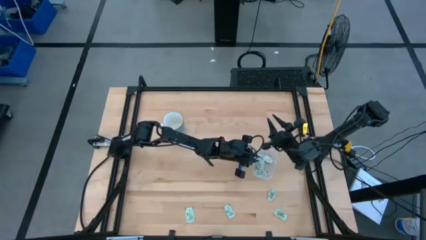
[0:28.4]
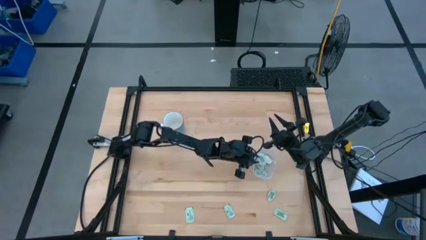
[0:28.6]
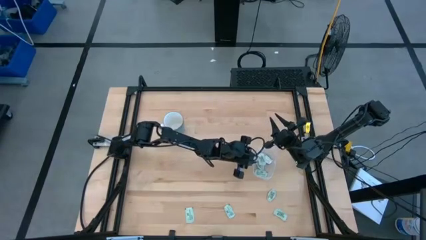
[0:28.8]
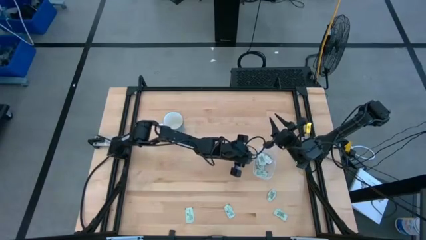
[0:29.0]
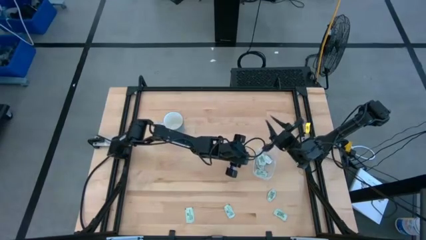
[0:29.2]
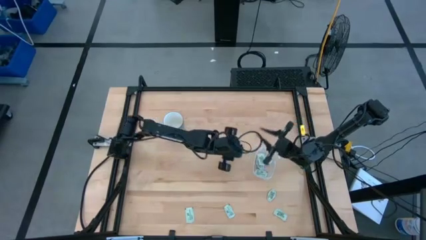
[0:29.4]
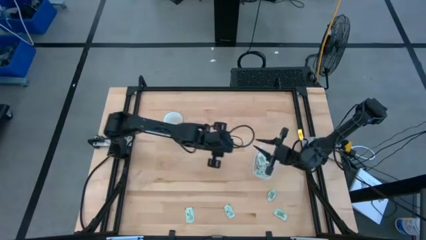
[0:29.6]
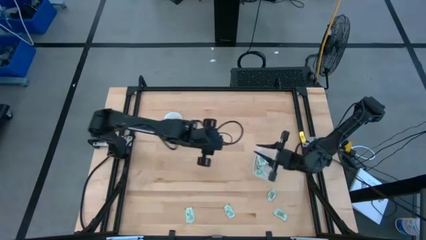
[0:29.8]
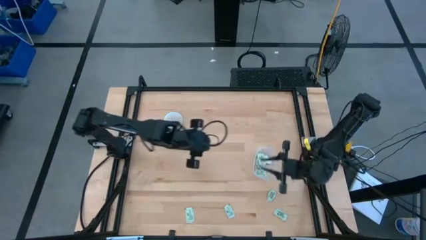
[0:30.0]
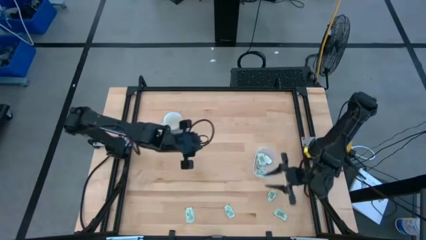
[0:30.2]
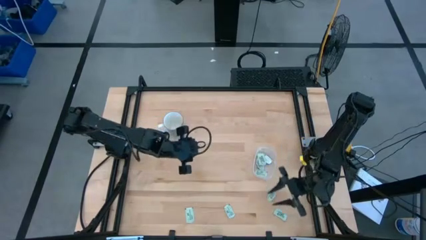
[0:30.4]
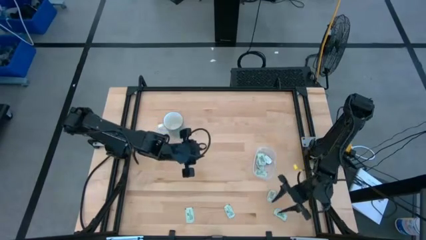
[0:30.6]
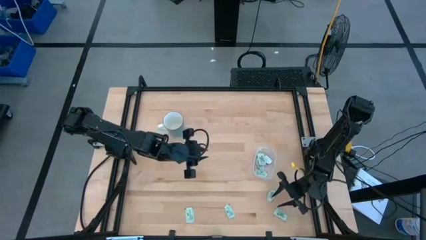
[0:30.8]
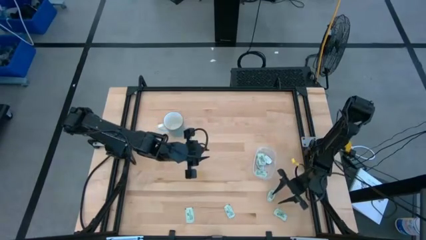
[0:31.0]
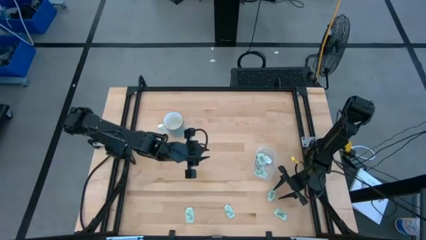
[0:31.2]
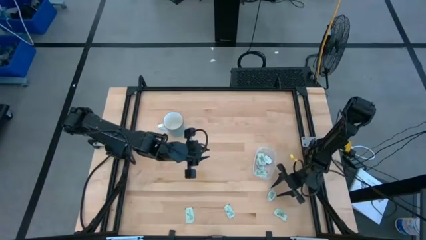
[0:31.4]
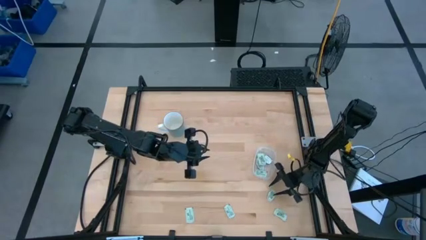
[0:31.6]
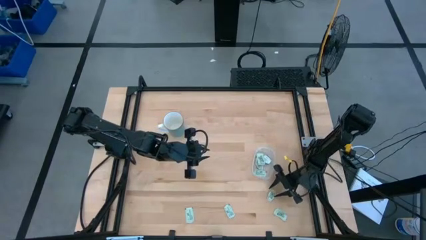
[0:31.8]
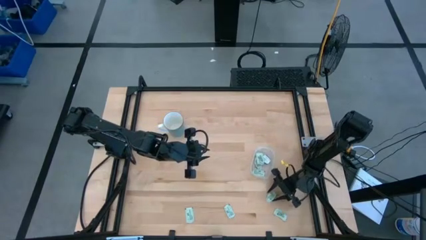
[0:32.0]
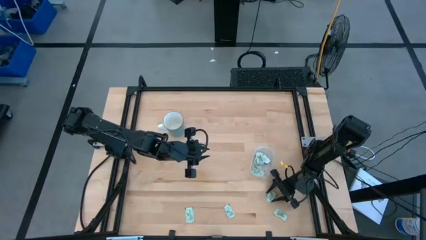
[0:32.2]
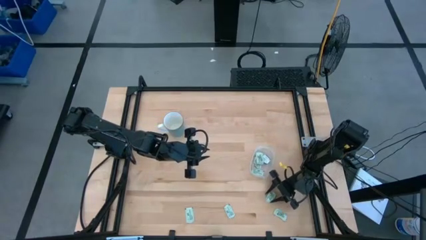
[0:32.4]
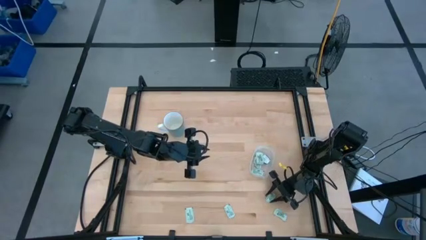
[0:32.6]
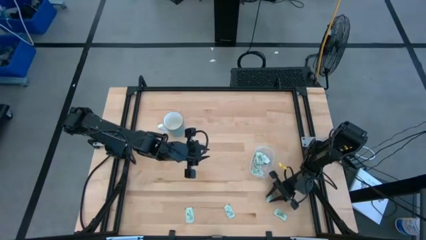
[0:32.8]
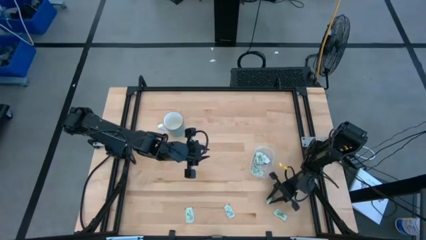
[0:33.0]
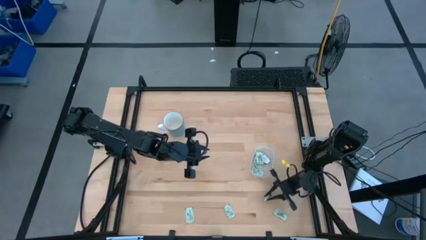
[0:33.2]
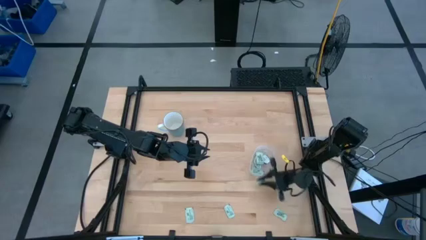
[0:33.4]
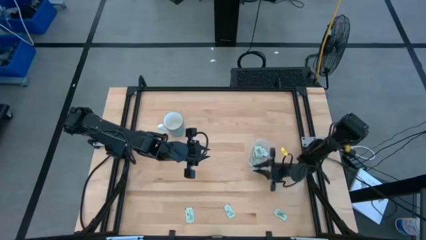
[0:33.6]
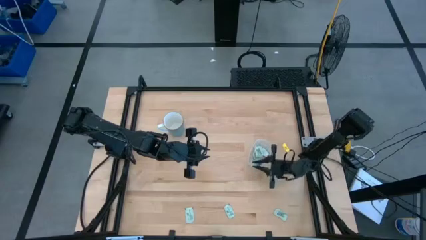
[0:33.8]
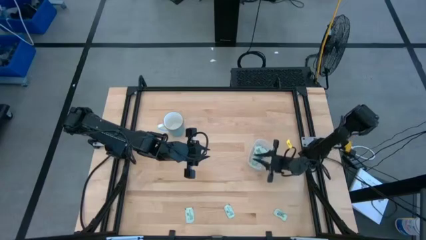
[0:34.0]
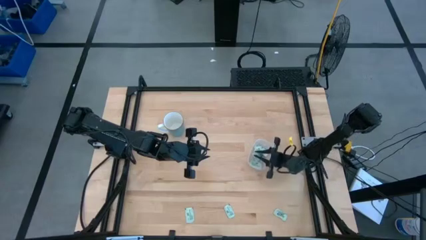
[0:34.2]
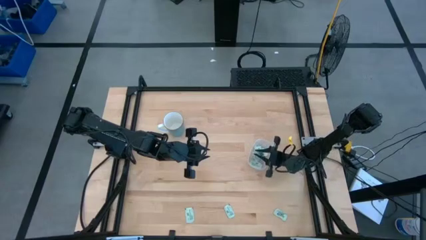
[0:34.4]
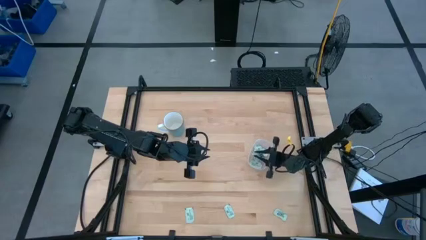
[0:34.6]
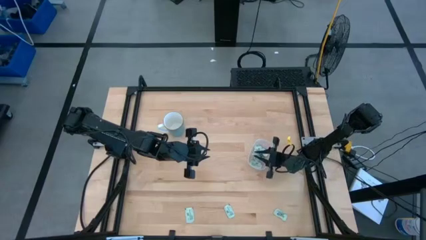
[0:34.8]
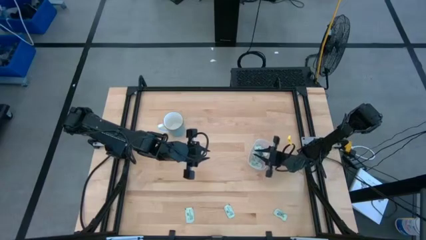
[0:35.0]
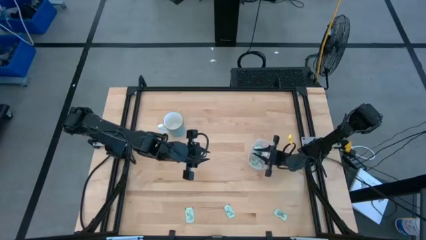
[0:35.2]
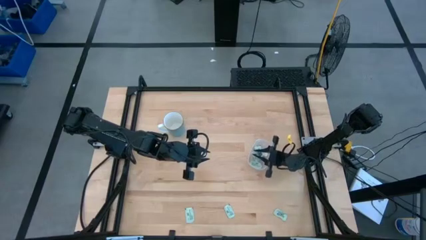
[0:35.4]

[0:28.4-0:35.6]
Task: Pick and place Stevia / Truvia into bins
Put the stevia packet into the container

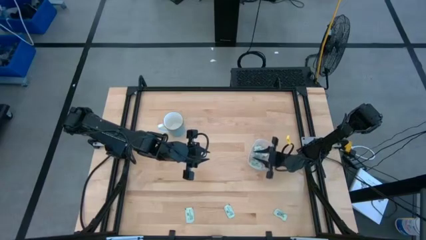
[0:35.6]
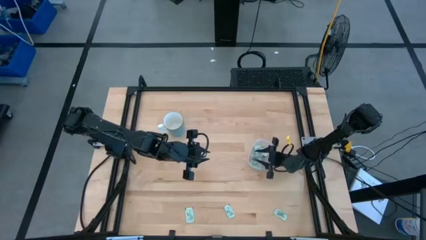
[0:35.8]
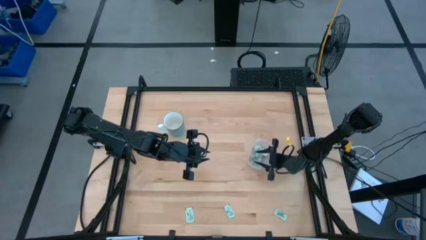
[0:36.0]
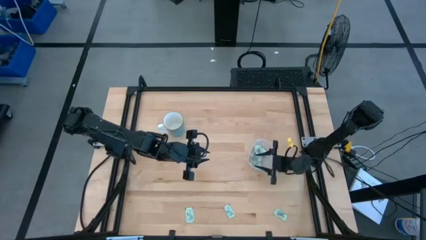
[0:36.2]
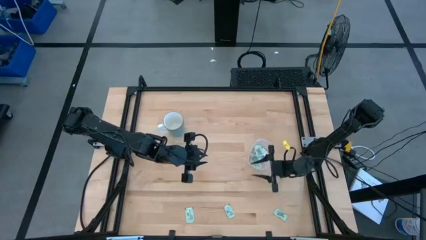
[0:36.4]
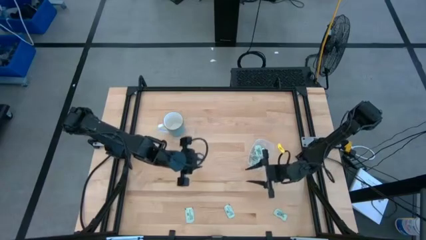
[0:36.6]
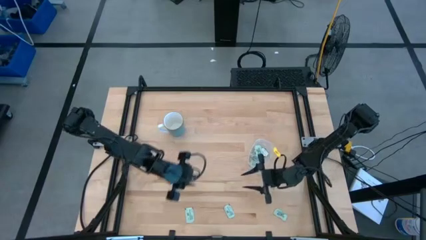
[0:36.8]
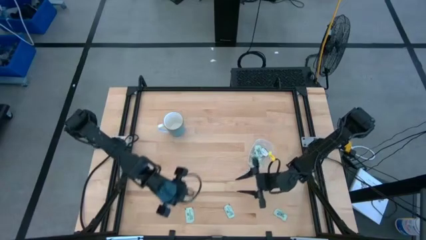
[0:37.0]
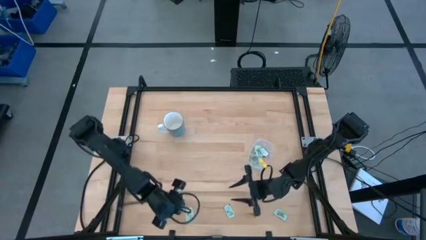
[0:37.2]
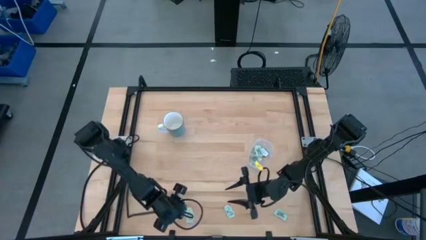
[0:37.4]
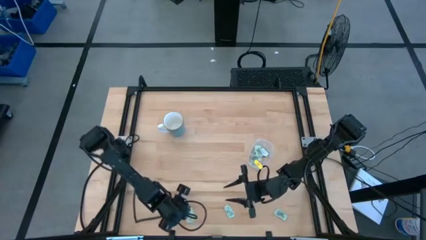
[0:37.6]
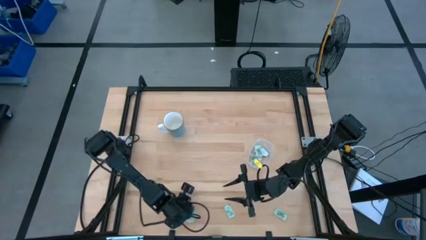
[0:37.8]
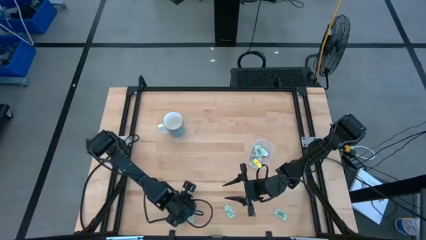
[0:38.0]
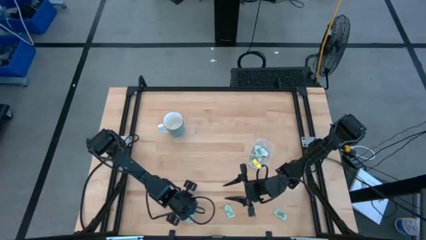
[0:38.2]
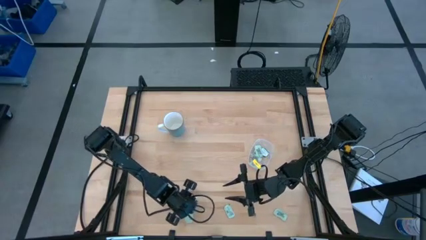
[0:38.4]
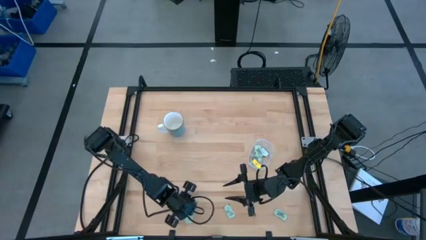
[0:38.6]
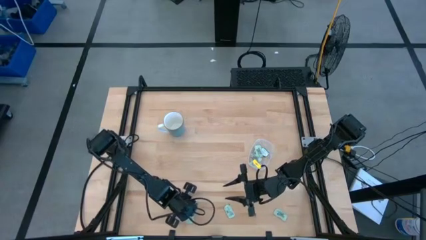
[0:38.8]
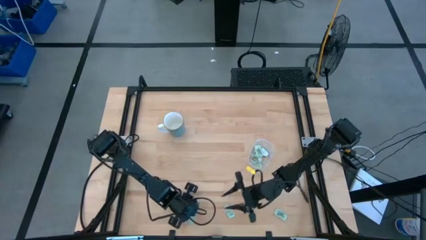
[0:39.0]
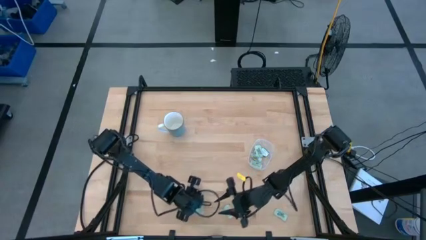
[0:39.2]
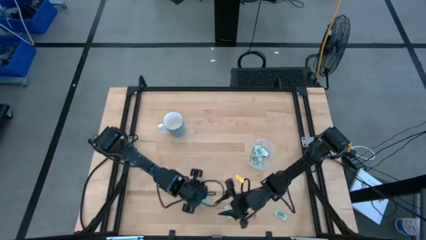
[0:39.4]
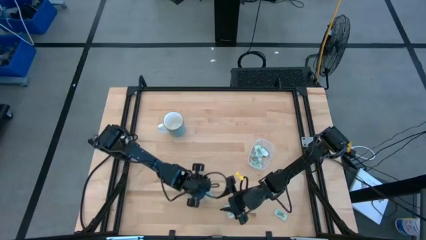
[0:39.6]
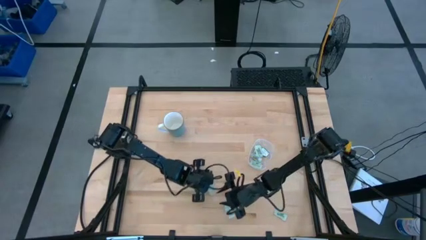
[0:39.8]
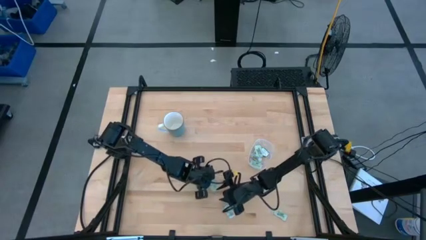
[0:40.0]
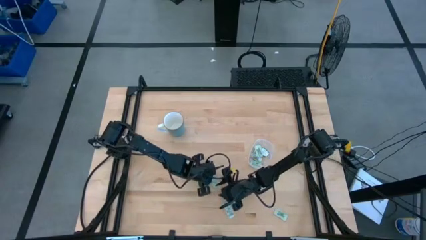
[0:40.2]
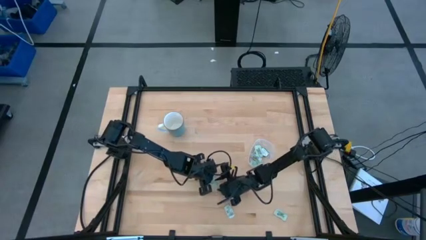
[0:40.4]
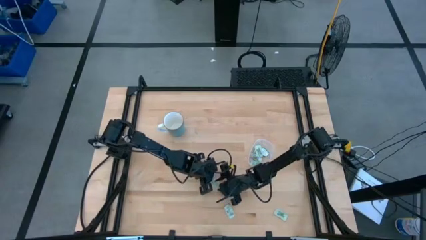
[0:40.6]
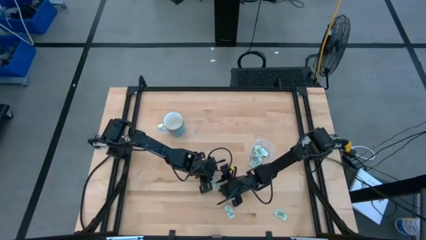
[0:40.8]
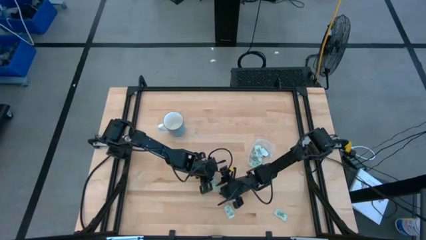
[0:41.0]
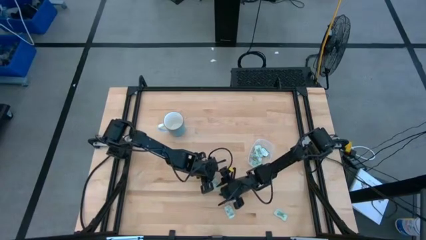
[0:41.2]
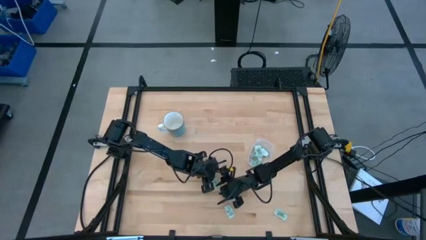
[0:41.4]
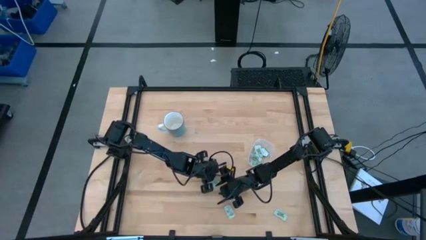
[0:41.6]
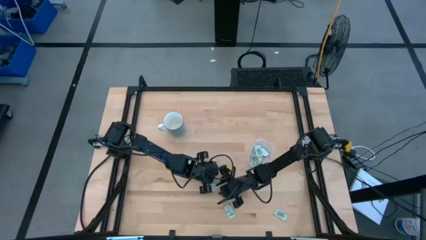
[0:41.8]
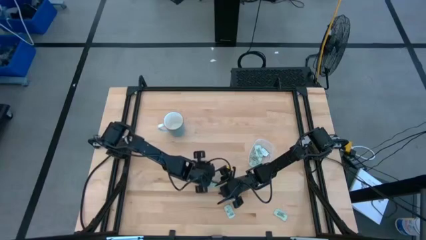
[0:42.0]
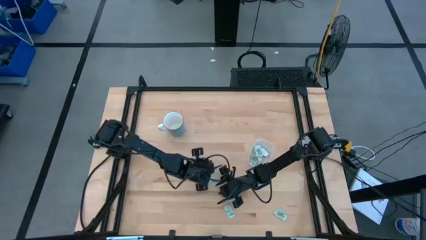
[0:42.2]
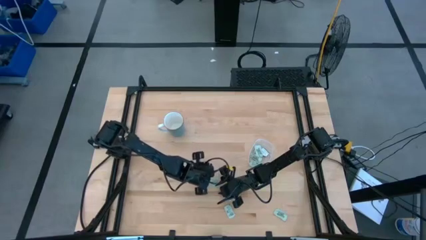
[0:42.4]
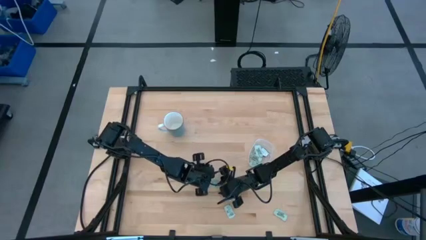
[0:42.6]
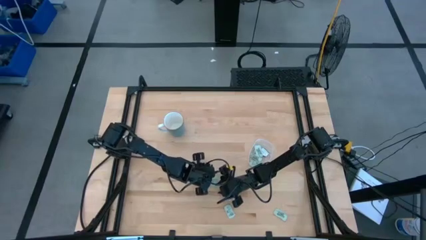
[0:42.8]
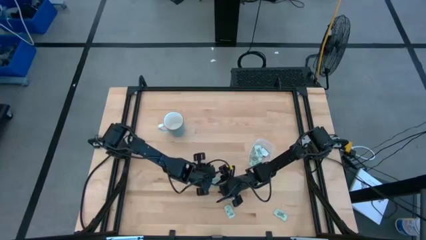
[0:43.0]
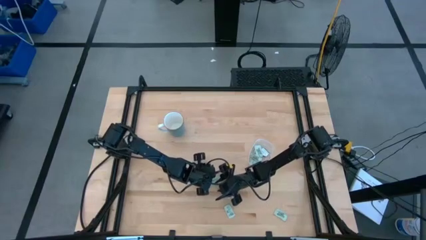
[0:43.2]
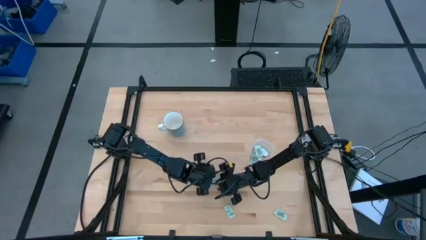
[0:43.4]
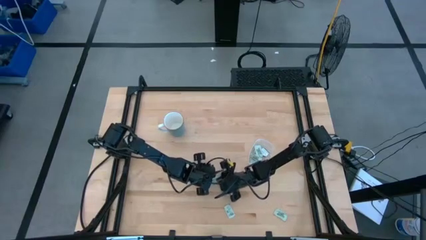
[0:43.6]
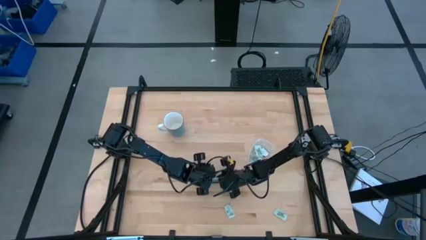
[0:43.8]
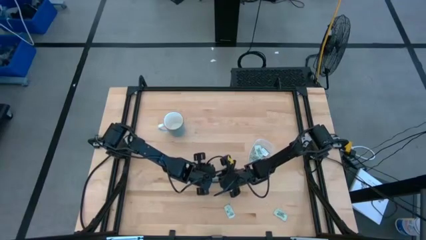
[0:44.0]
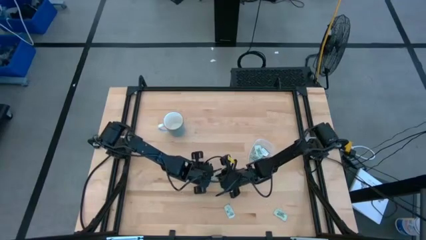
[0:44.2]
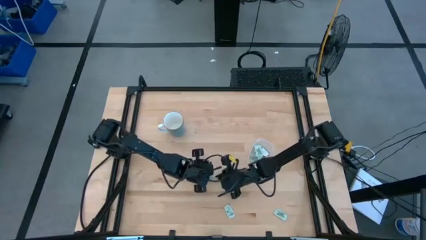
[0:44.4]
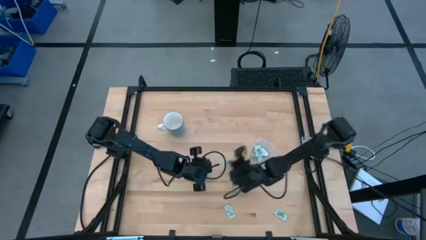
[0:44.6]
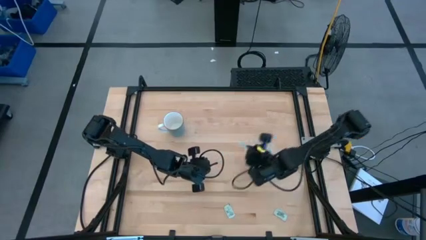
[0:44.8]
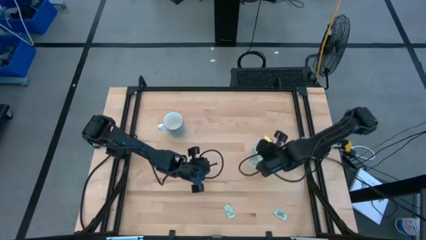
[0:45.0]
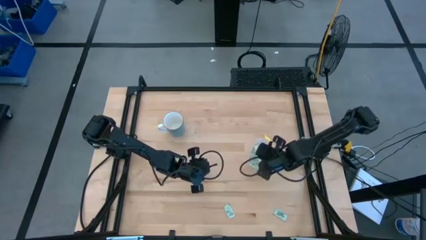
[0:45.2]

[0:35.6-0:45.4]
Put the left stevia packet into the container
